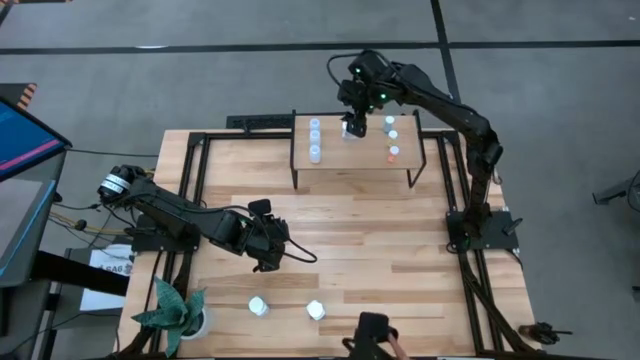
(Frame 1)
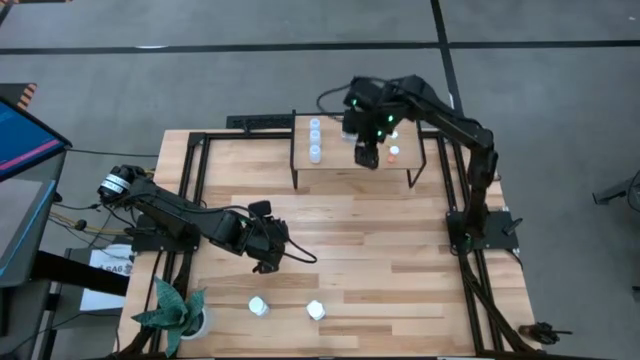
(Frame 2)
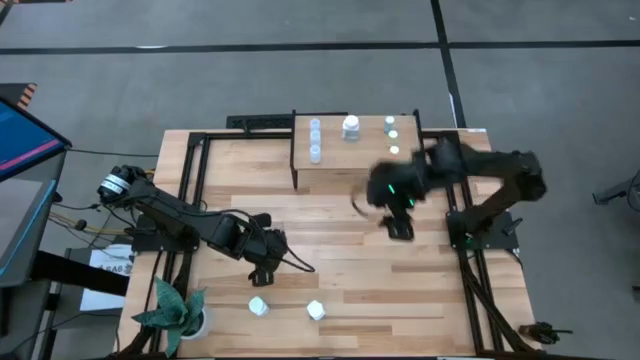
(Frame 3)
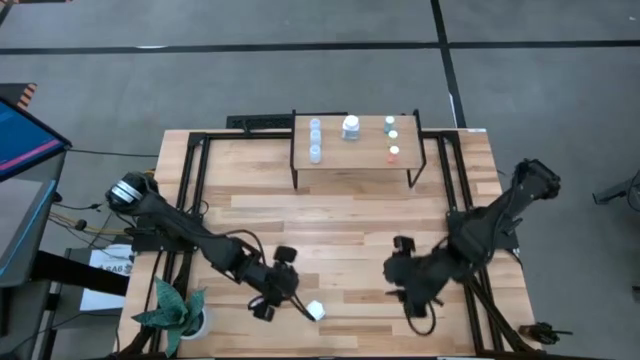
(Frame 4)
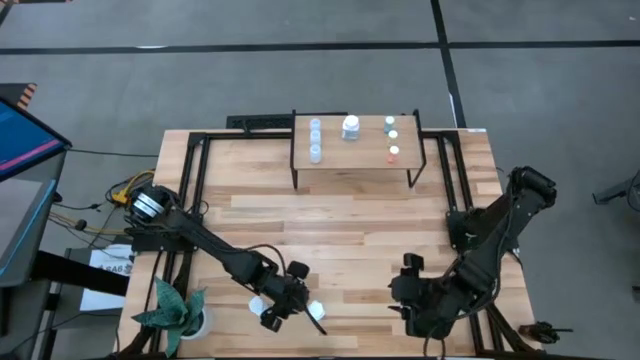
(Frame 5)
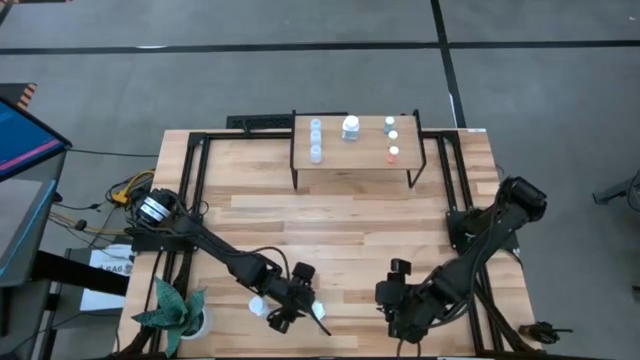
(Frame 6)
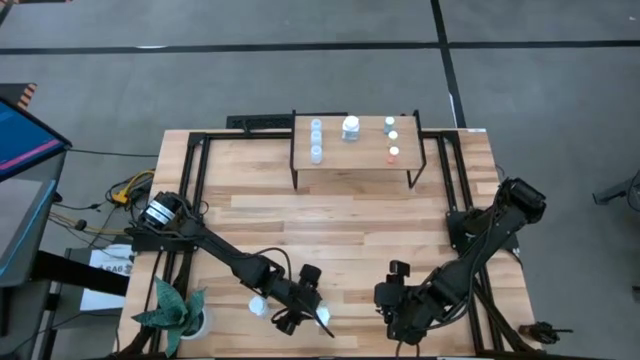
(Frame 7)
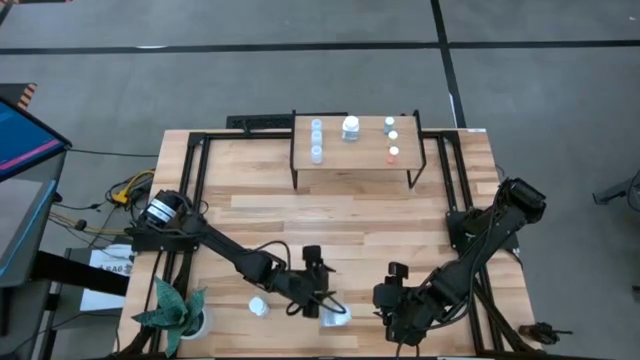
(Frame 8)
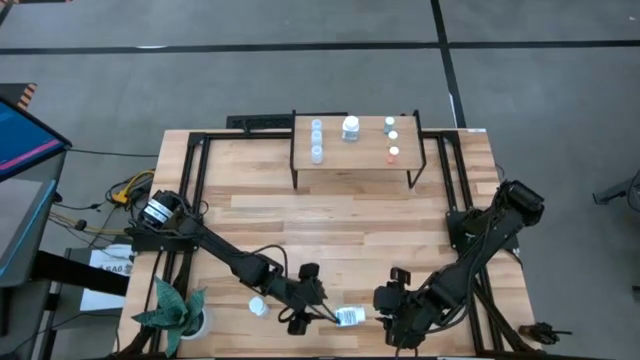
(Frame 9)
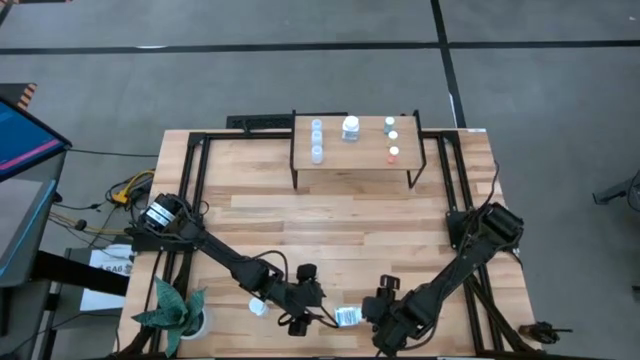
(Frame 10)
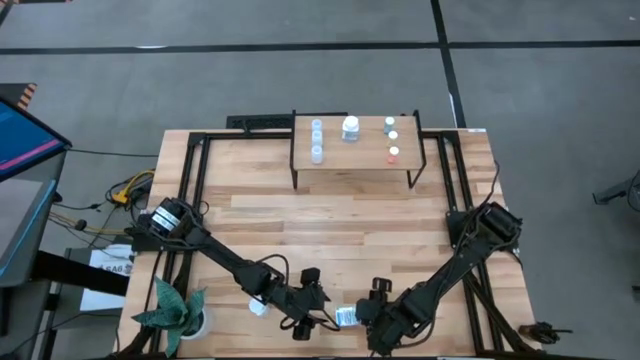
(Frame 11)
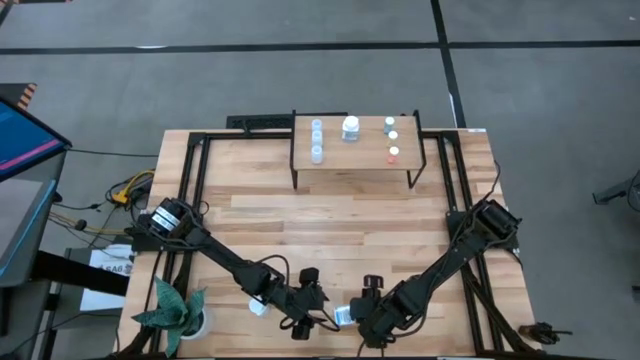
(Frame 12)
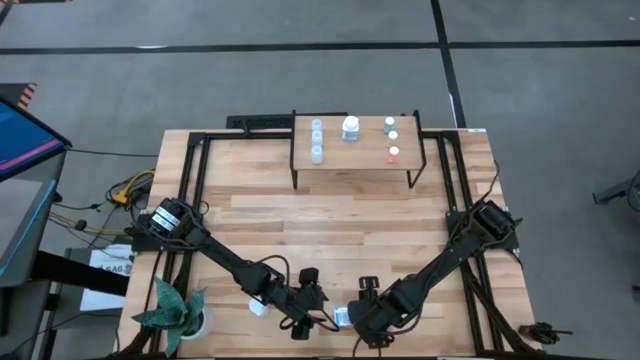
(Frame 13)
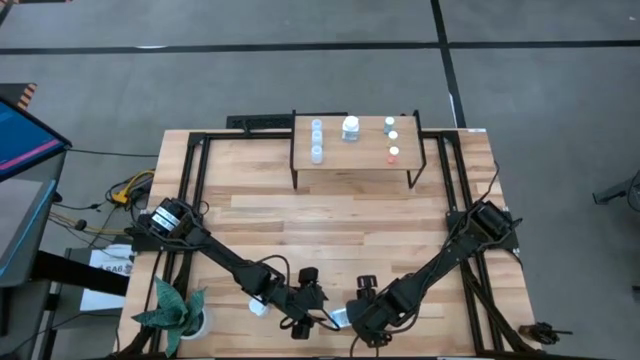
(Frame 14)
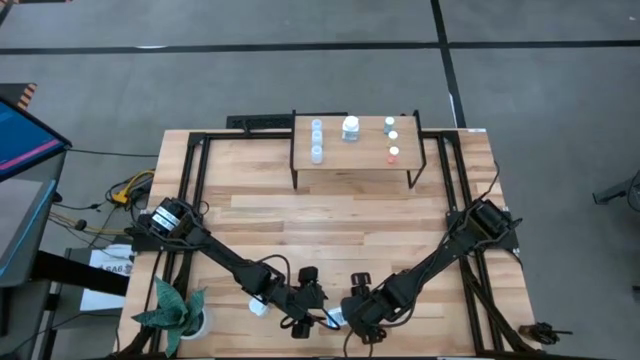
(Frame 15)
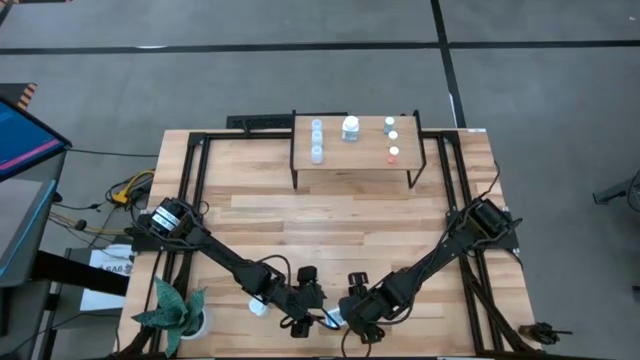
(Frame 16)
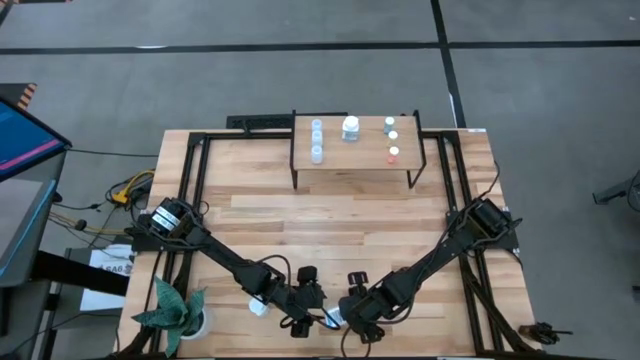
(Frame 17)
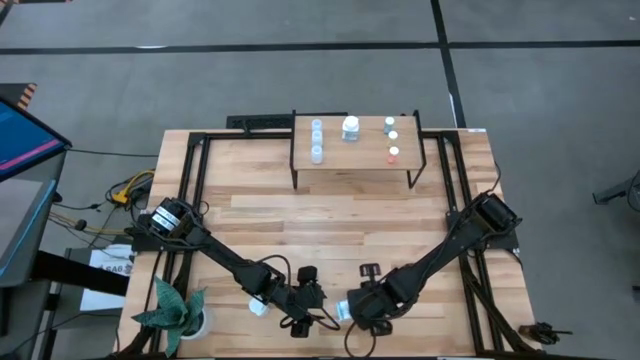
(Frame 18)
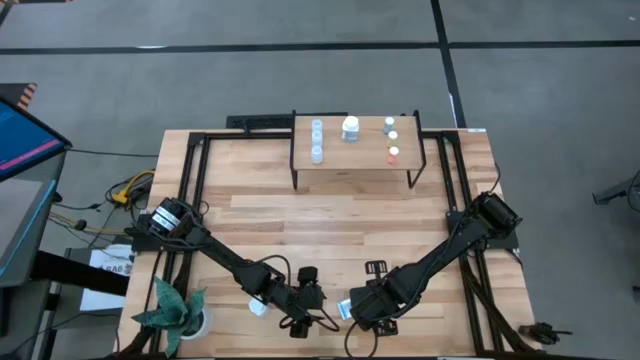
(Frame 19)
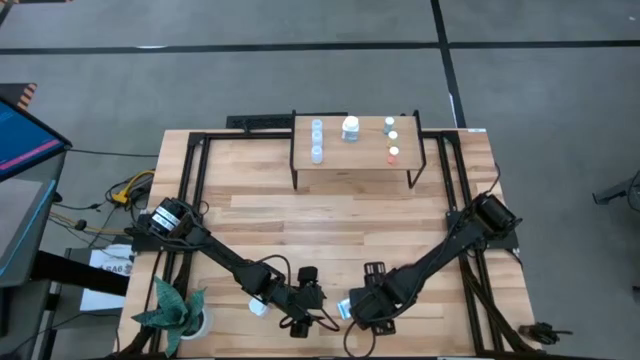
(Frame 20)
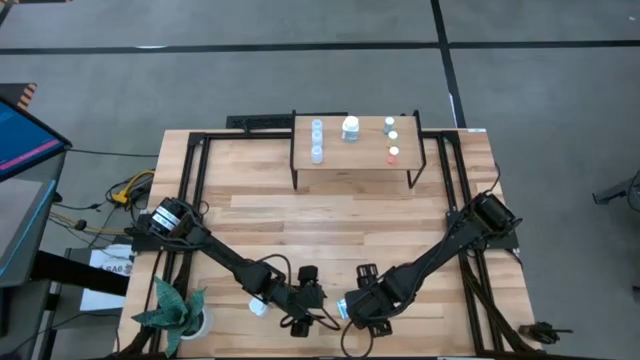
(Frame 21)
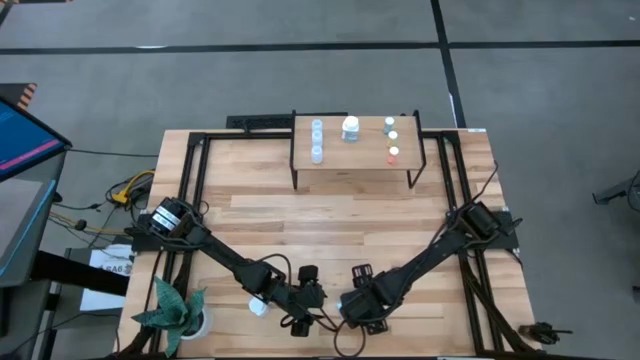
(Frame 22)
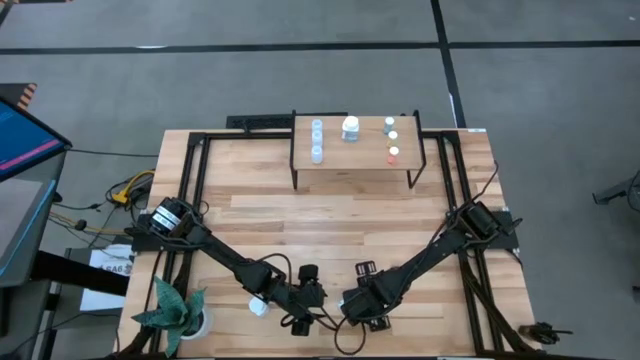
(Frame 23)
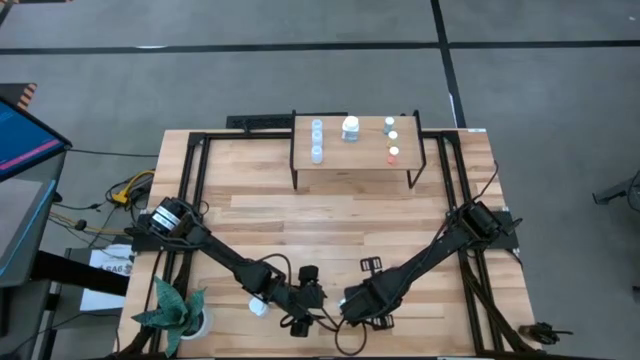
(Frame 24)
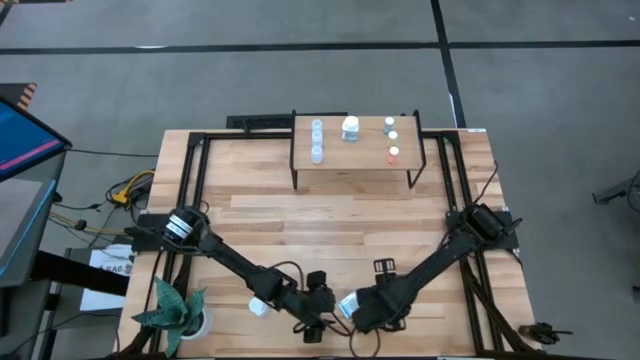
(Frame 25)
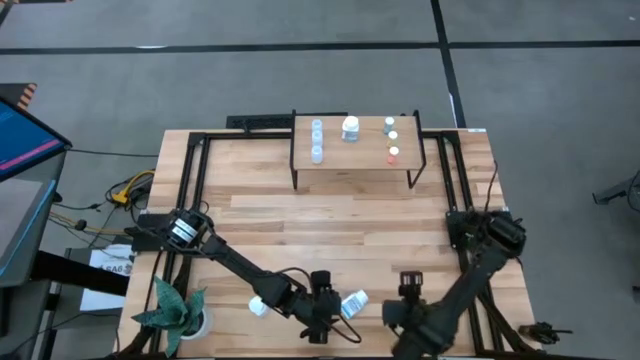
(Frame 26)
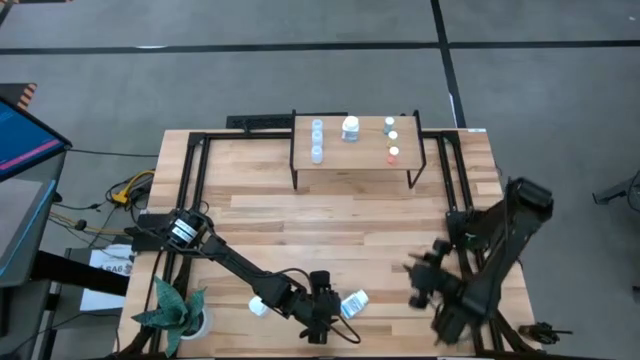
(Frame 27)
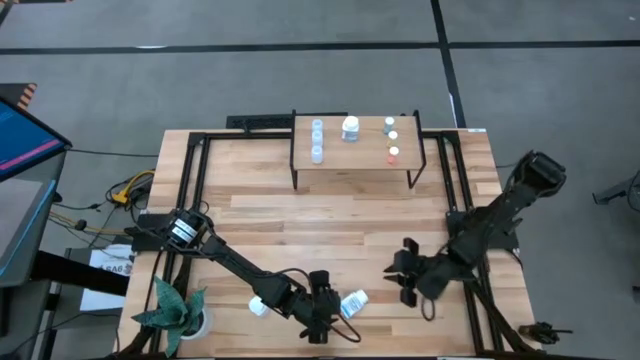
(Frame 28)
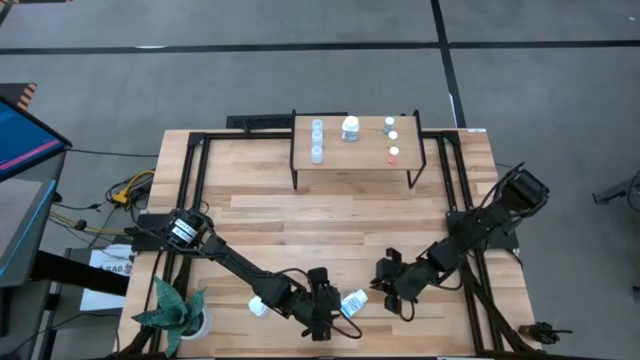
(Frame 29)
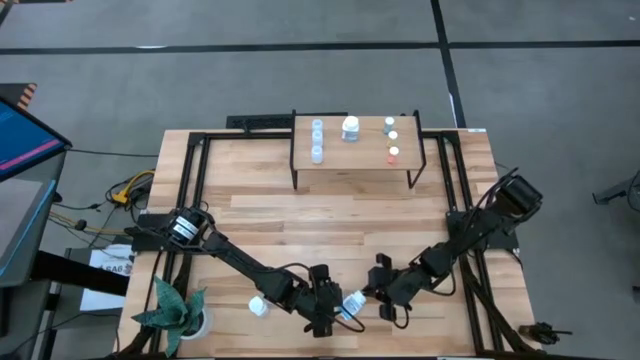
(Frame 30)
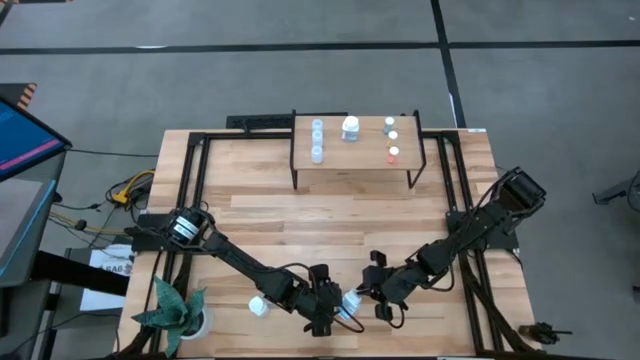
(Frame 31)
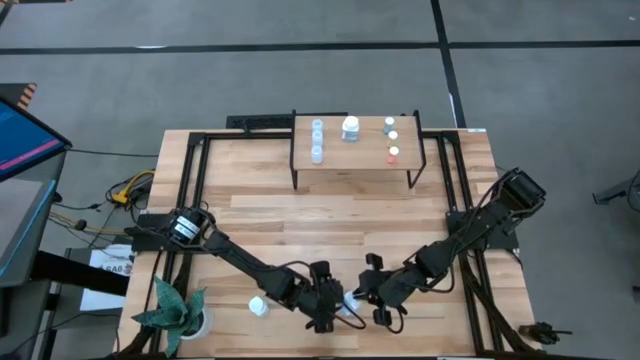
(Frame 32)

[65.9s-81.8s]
Task: Pick and place medicine bottles onto shelf by color
Put the right white big pill bottle on the shelf

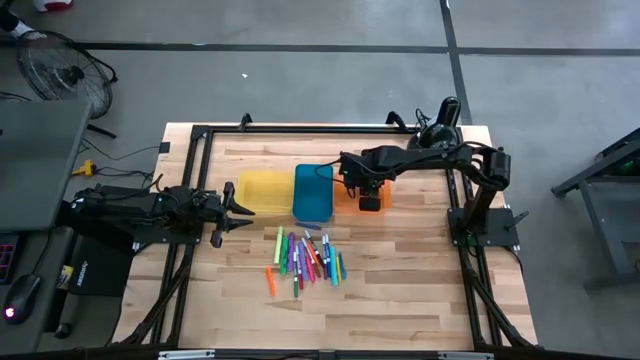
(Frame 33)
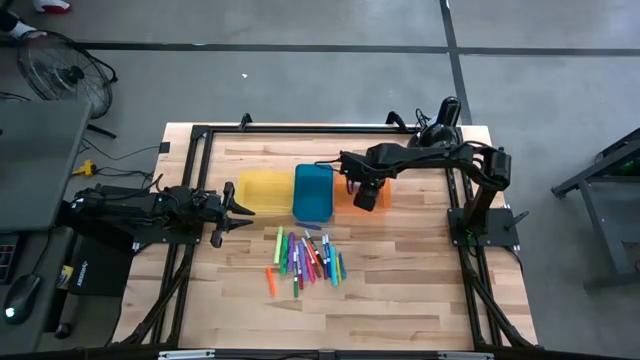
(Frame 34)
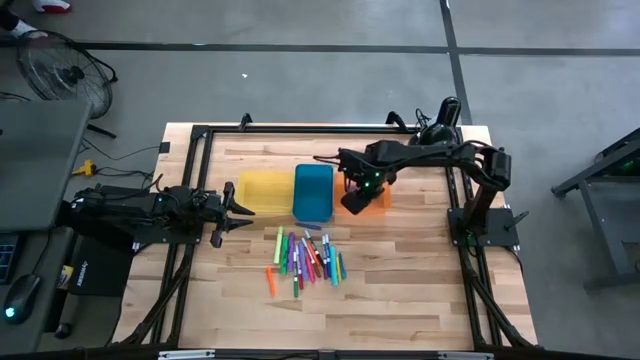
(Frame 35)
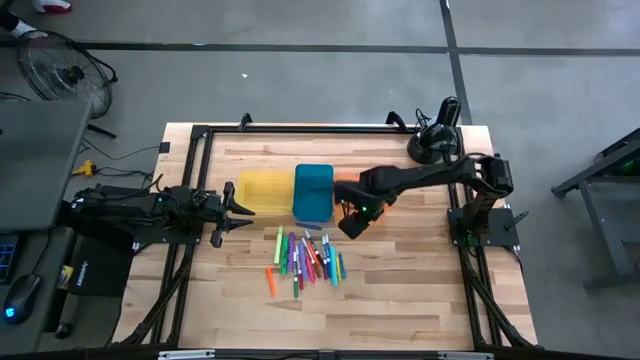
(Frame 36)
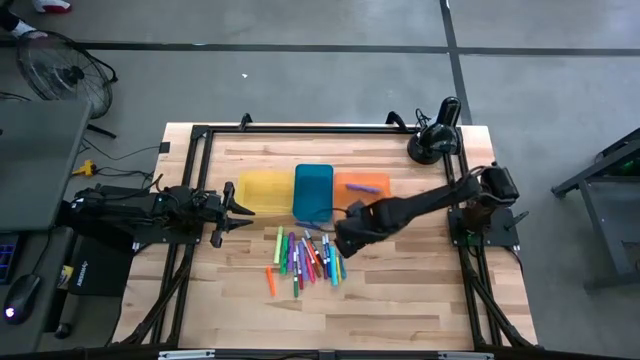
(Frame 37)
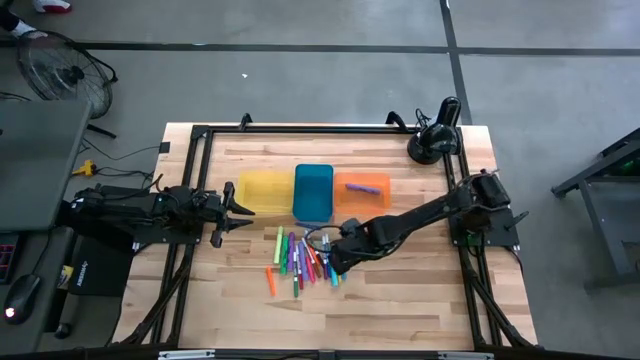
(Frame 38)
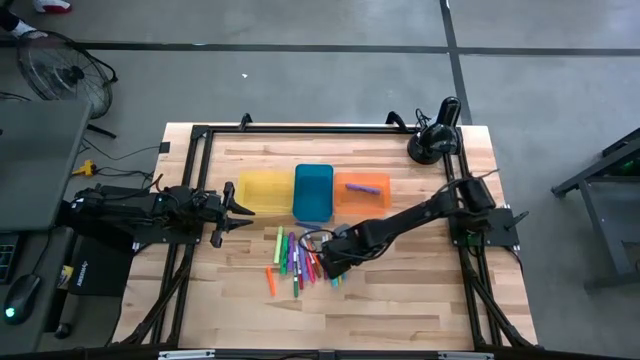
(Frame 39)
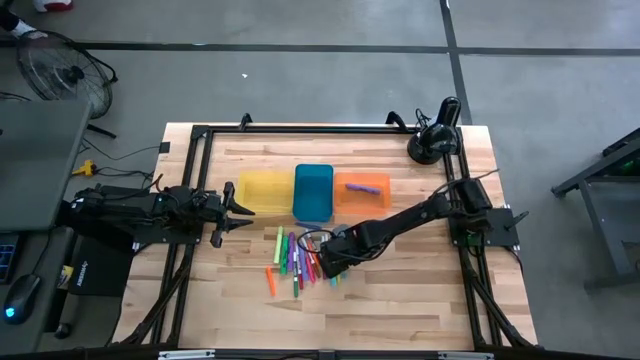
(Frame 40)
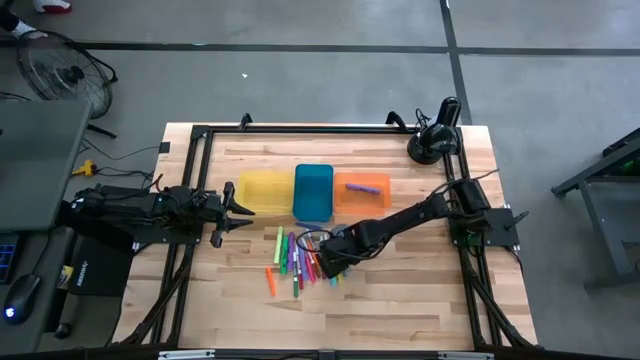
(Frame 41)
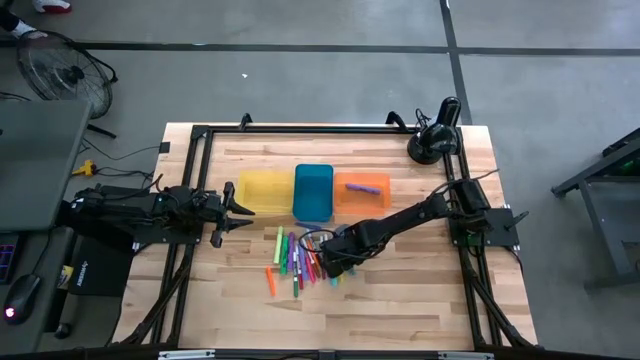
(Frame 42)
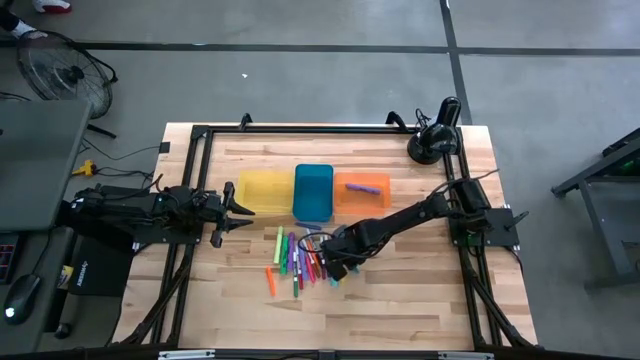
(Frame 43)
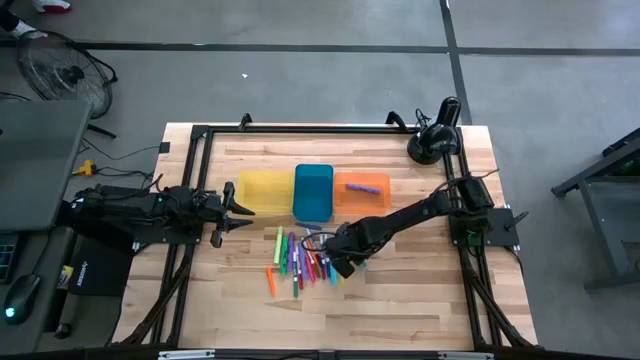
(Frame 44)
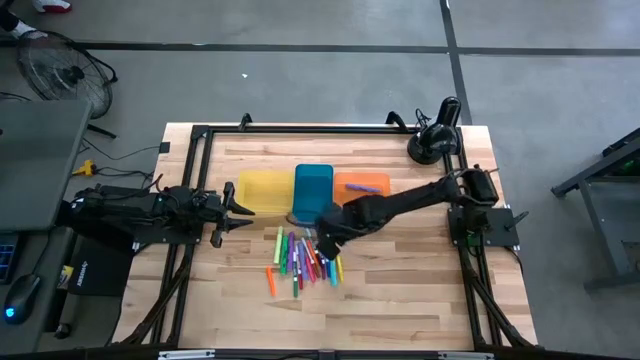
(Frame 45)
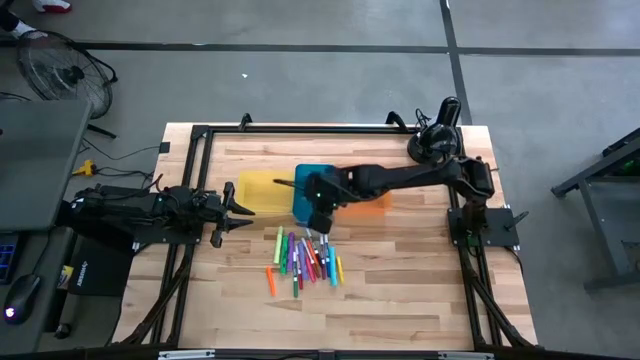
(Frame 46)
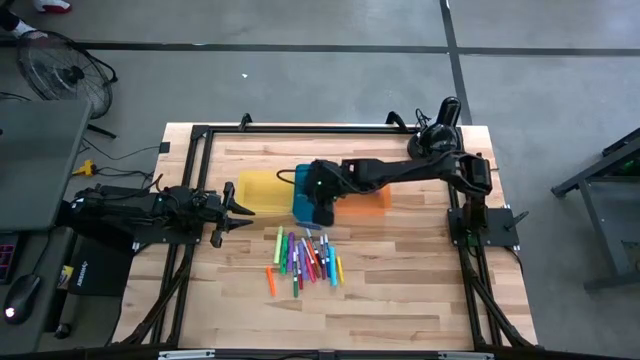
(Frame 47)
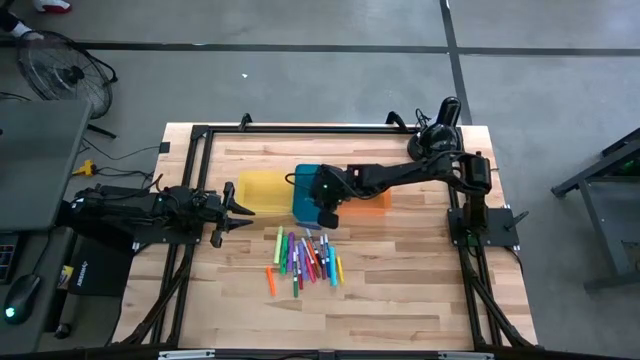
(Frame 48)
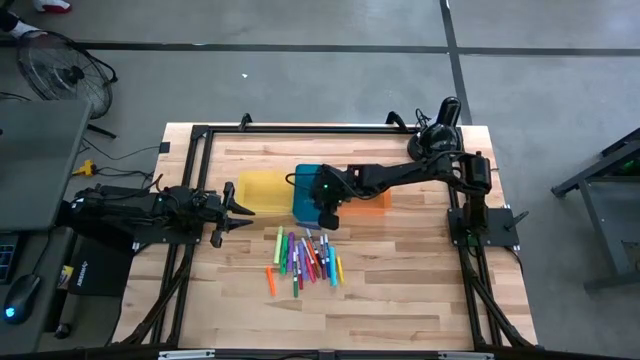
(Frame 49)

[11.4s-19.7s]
Task: Pick & Place Markers
Put the light blue pen into the blue bin
